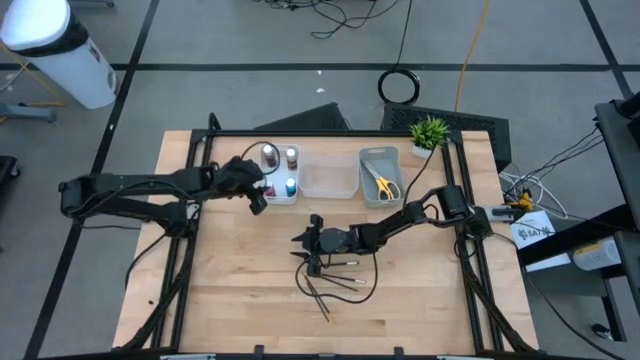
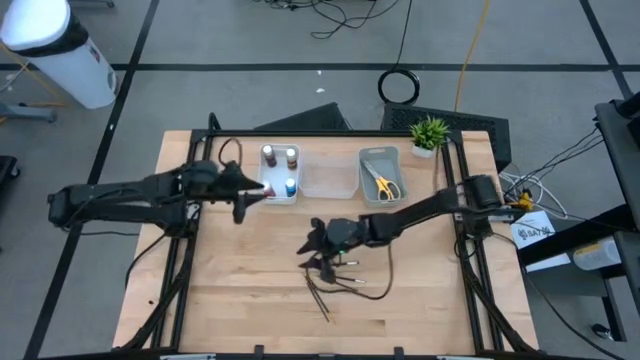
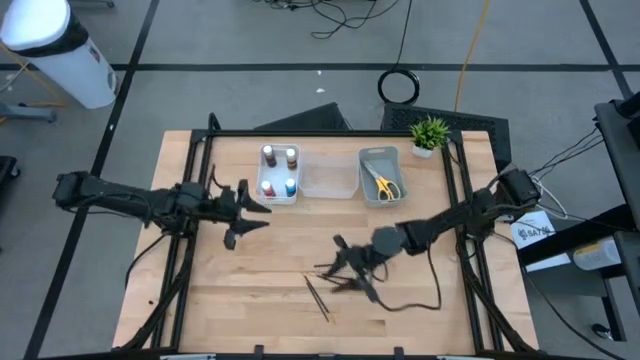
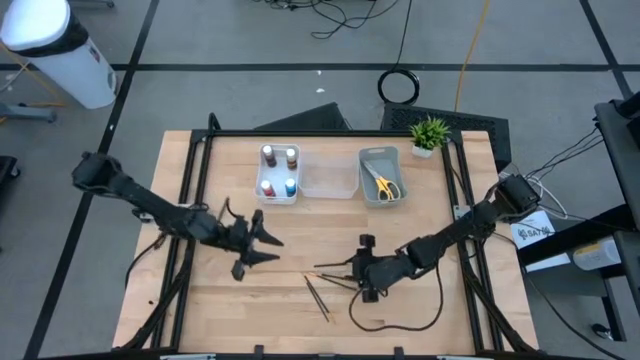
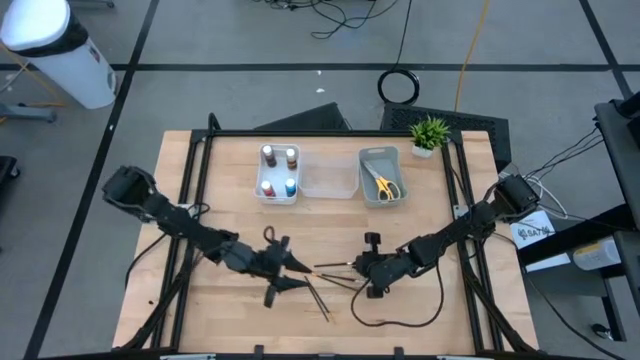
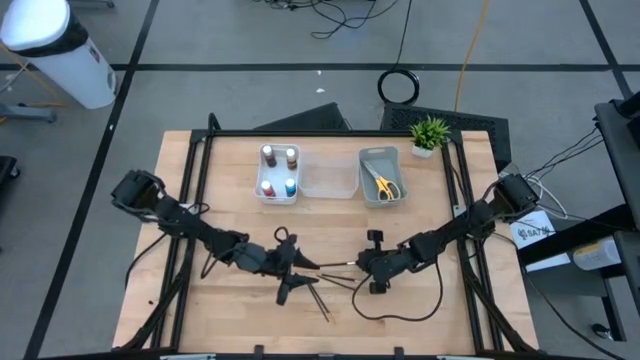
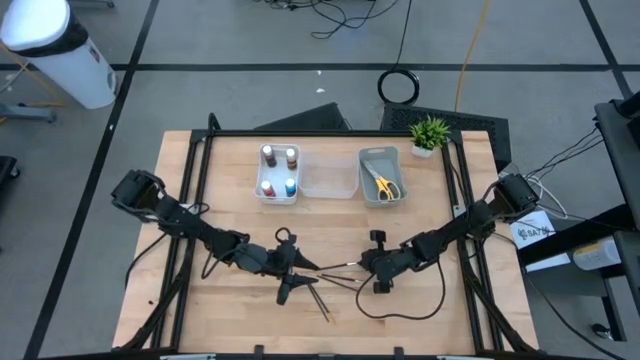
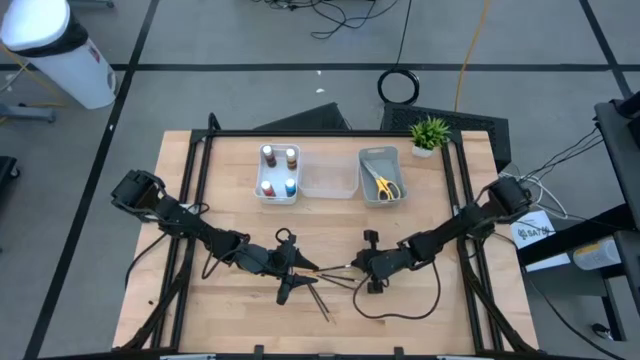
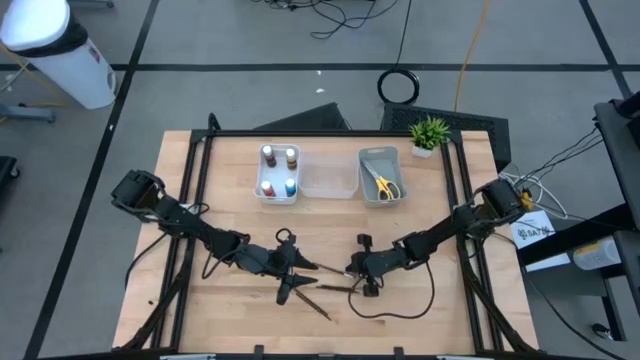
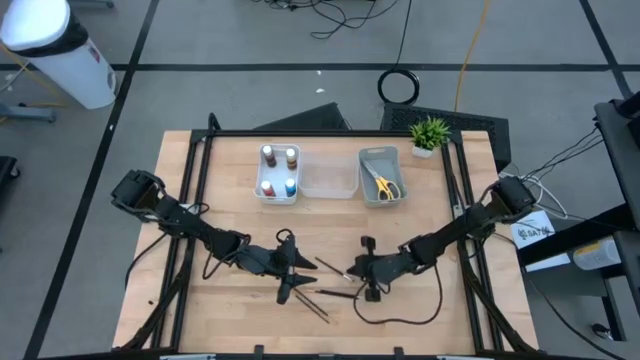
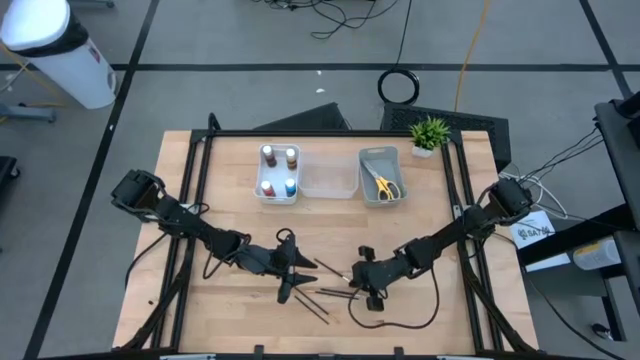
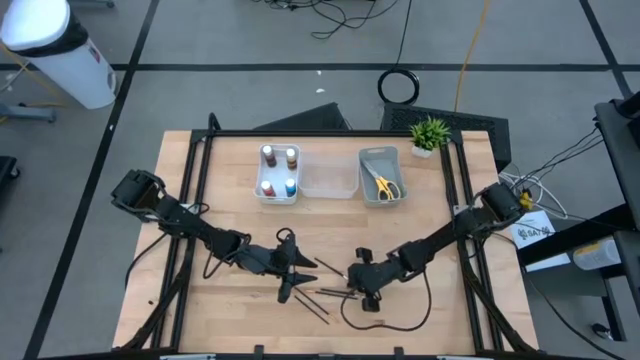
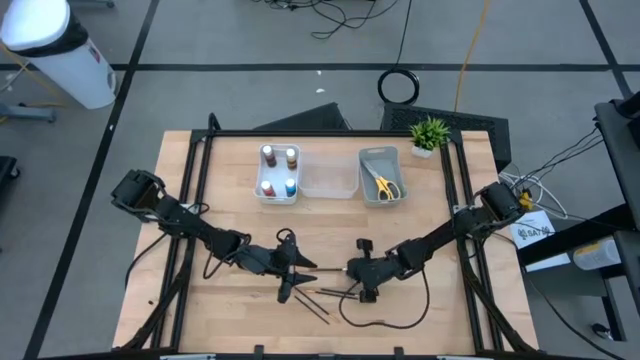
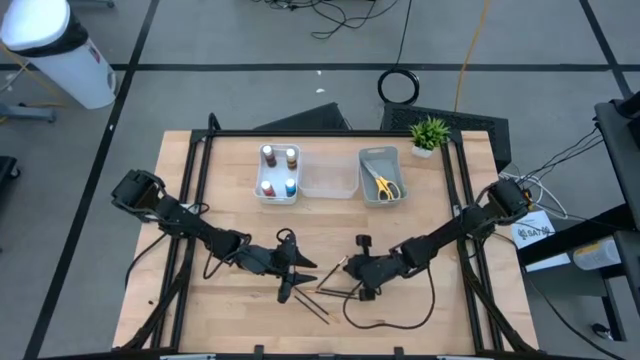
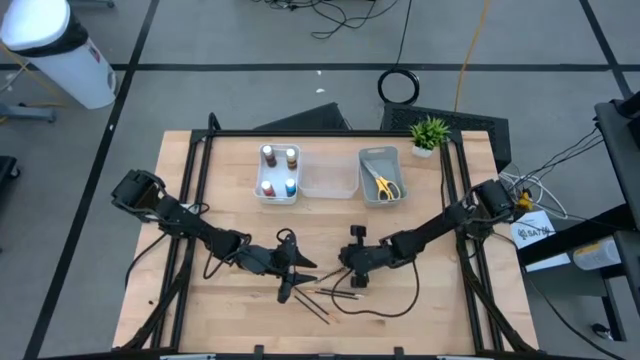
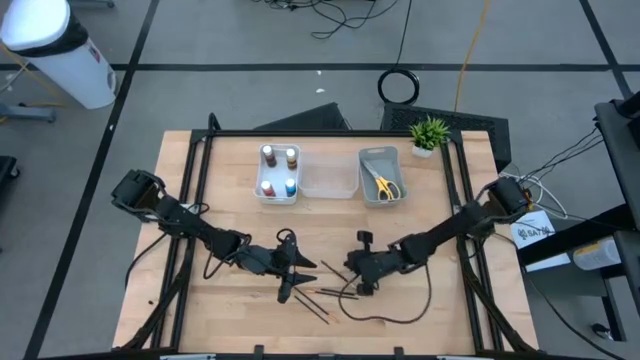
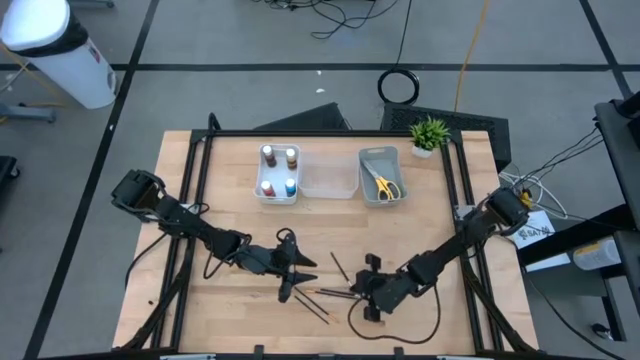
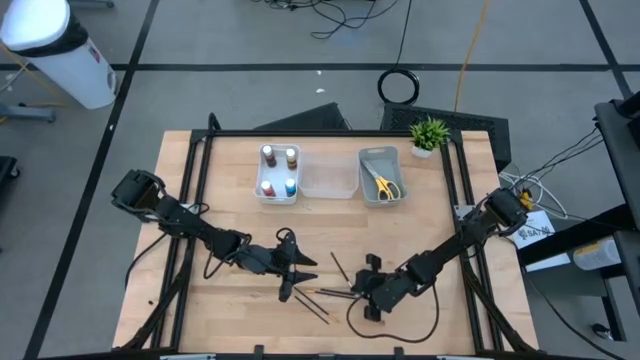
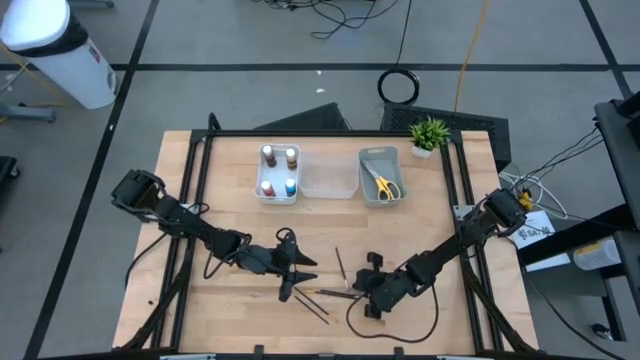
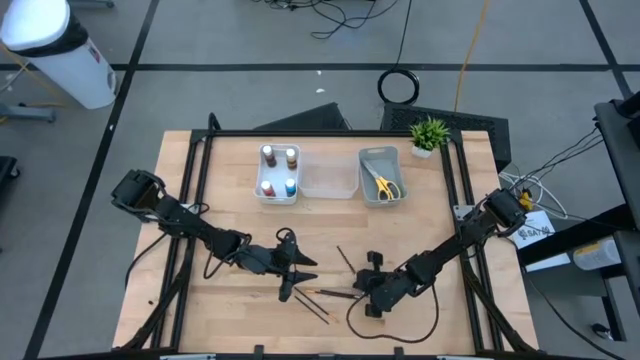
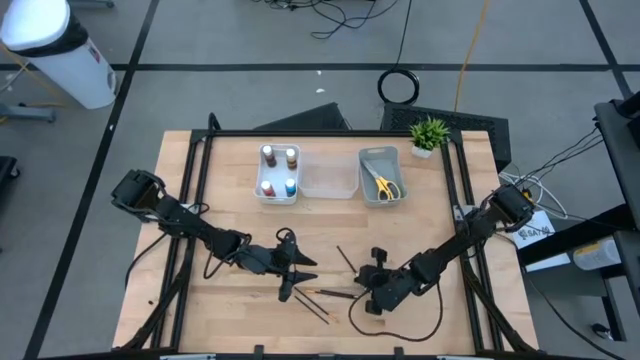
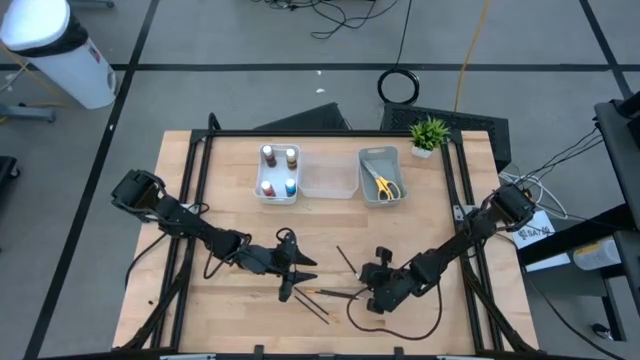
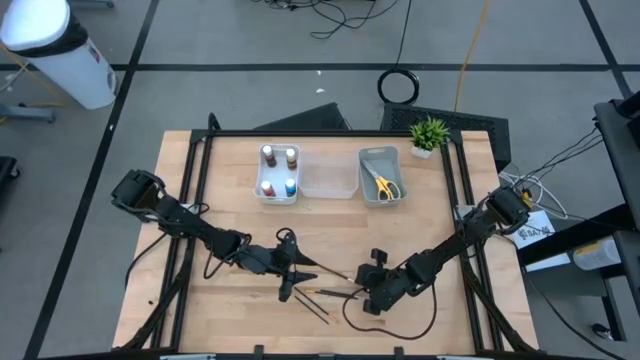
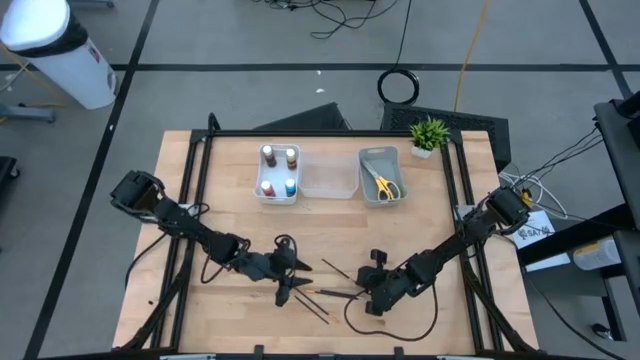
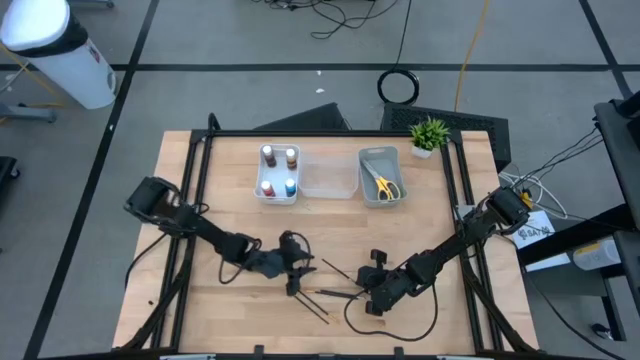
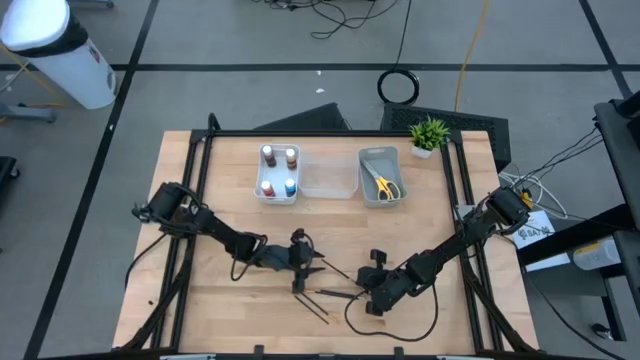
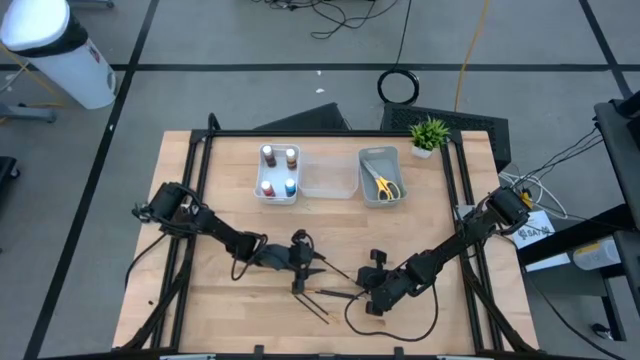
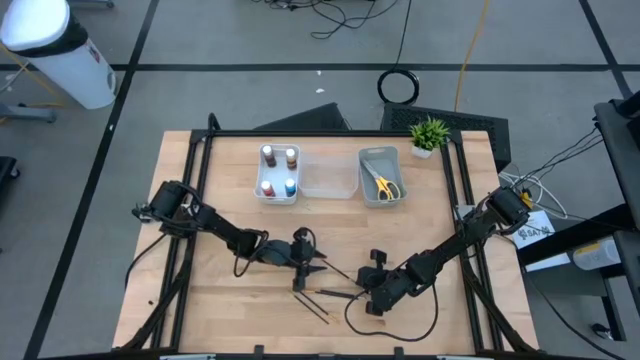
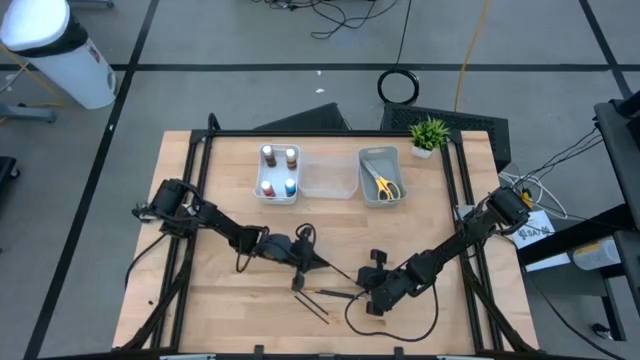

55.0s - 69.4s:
Task: Pick & Place Paint Supplies
Put the silver paint brush in the transparent bin

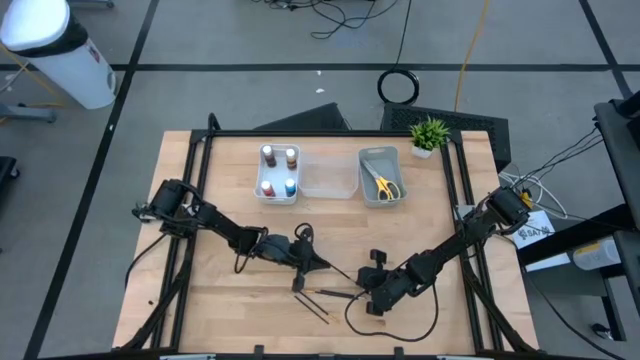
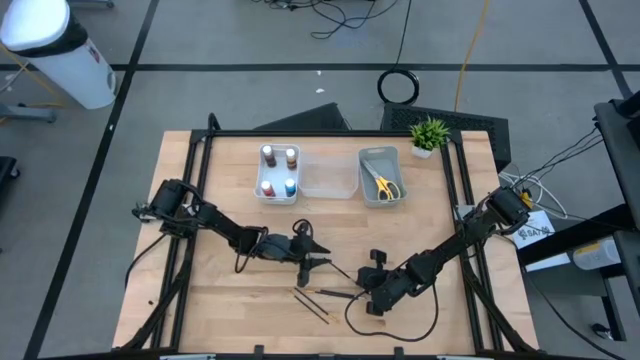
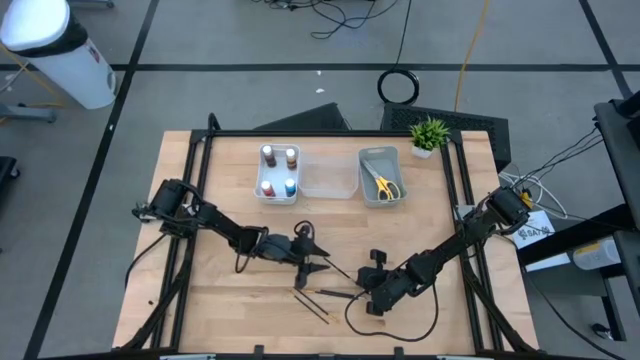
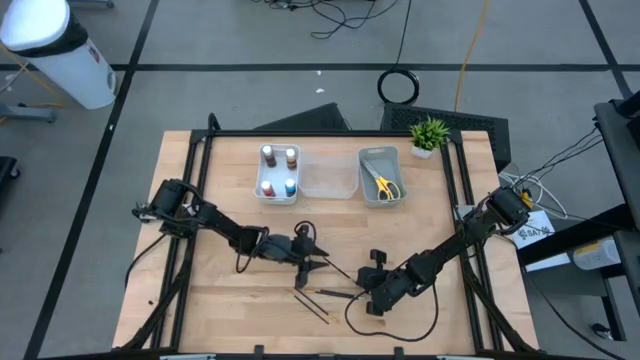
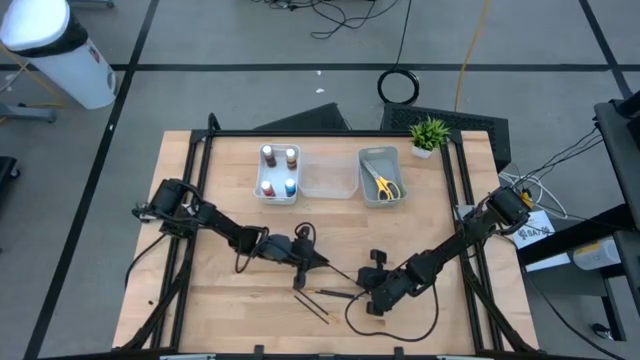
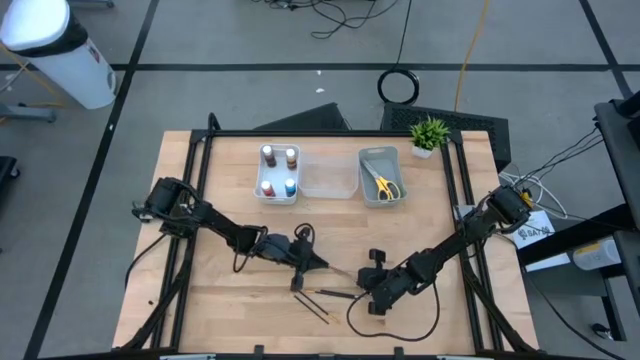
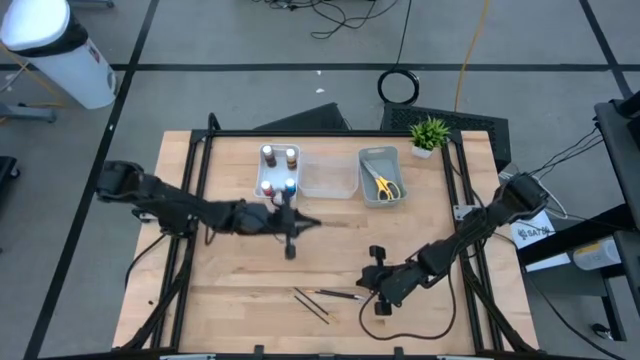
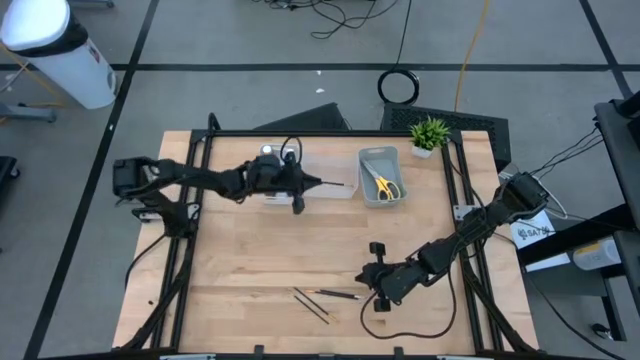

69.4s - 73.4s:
Put the silver paint brush in the transparent bin

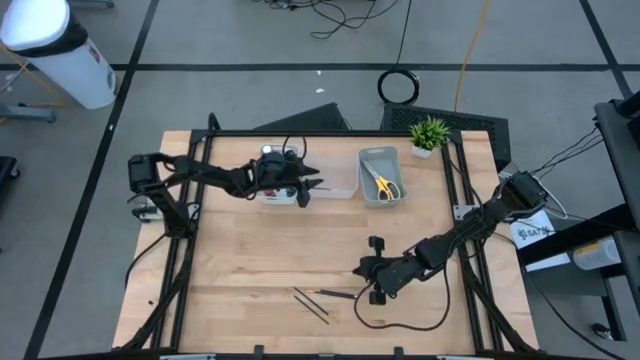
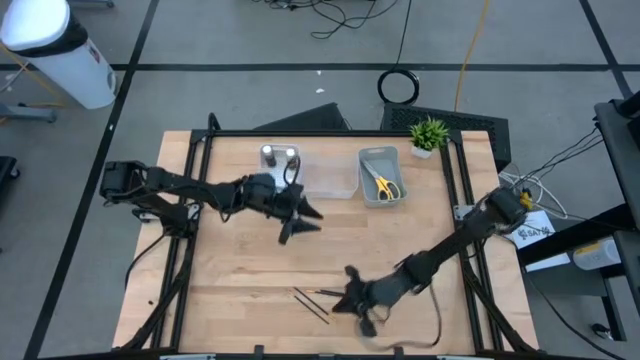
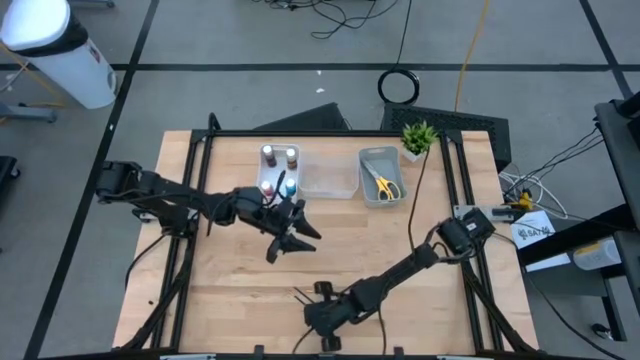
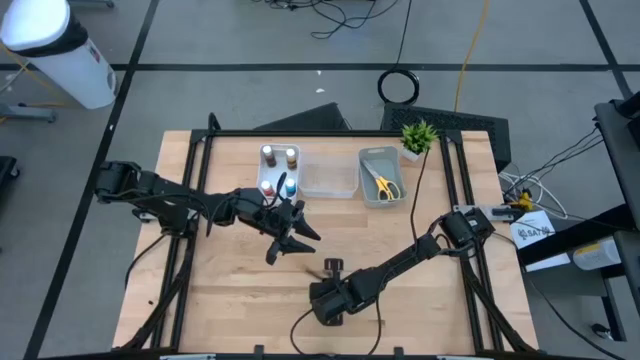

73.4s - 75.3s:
Adjust the paint brushes
